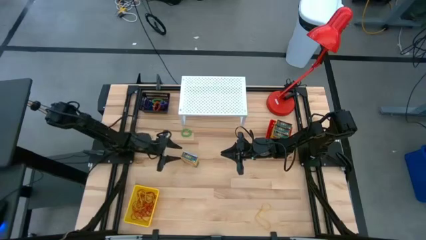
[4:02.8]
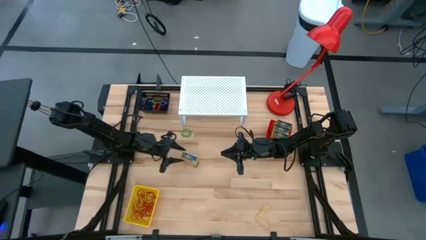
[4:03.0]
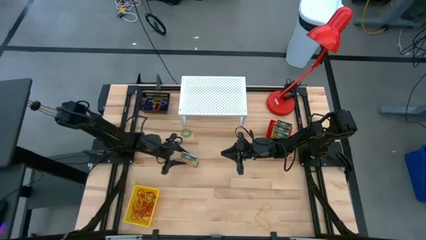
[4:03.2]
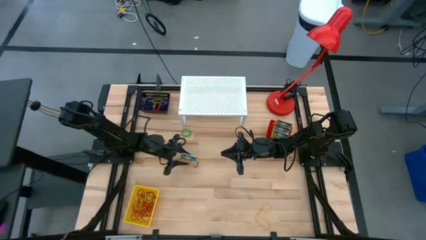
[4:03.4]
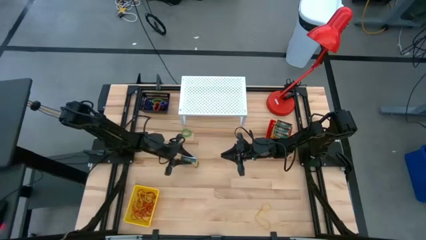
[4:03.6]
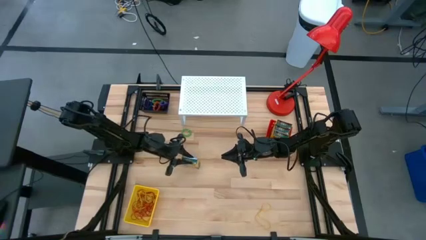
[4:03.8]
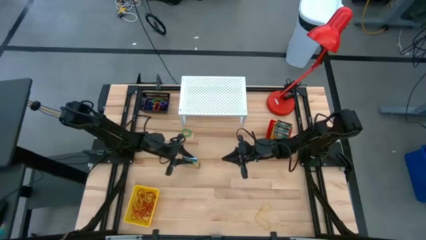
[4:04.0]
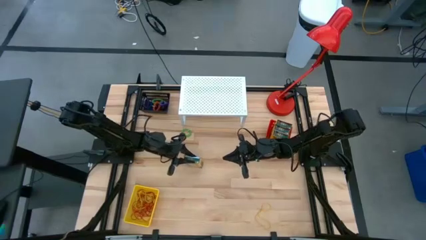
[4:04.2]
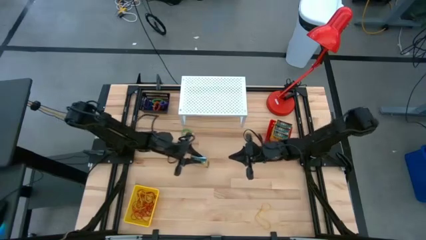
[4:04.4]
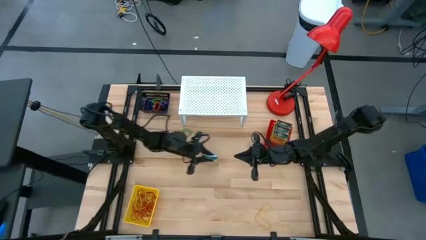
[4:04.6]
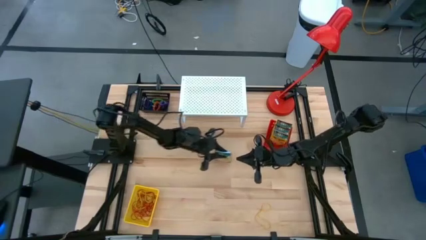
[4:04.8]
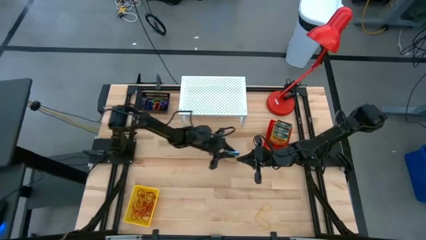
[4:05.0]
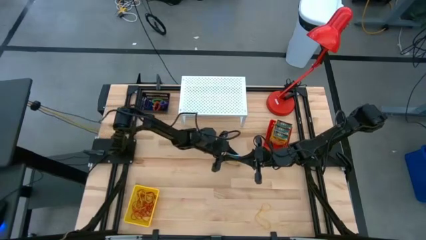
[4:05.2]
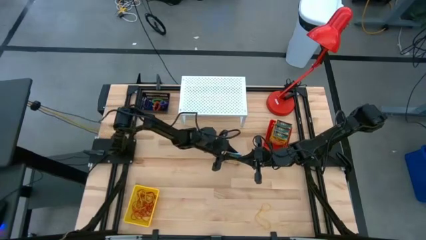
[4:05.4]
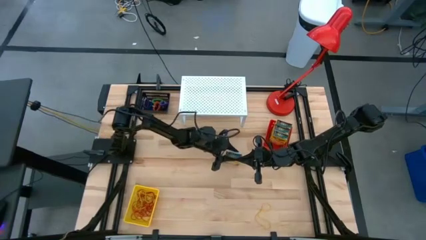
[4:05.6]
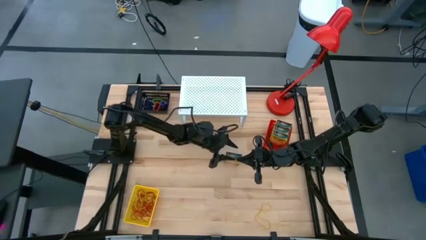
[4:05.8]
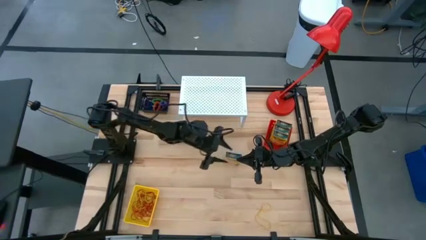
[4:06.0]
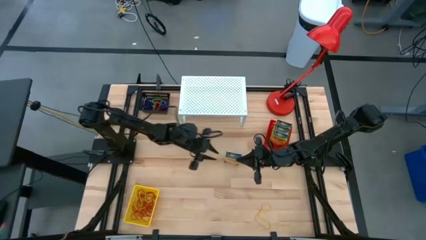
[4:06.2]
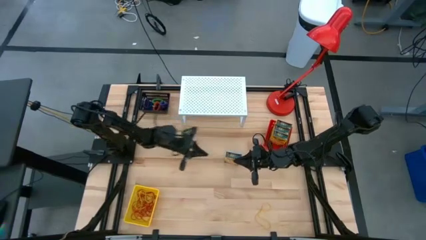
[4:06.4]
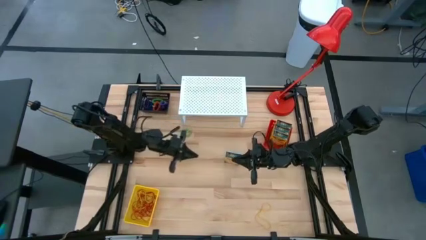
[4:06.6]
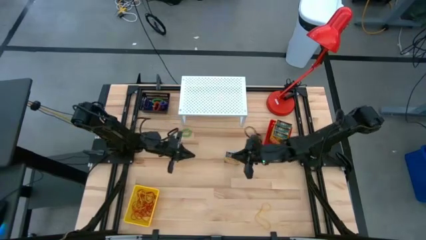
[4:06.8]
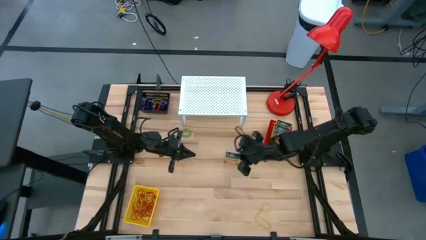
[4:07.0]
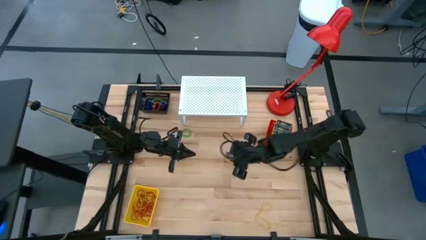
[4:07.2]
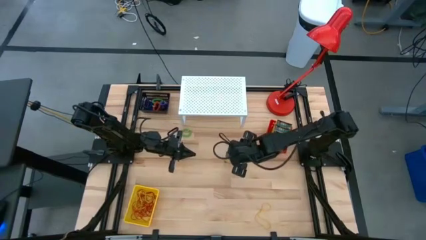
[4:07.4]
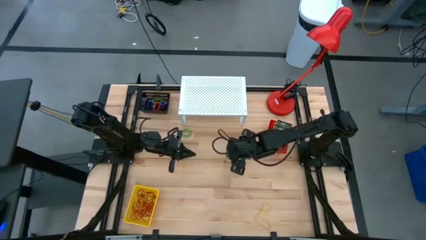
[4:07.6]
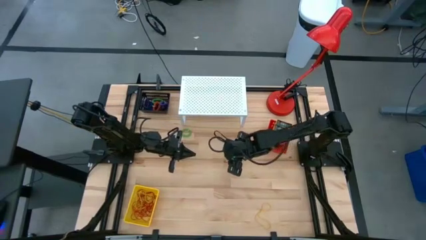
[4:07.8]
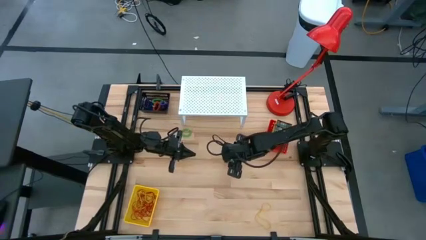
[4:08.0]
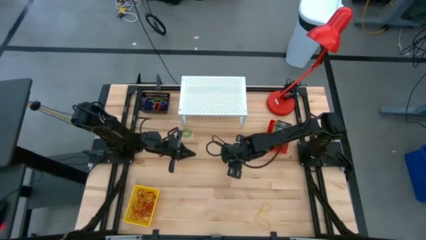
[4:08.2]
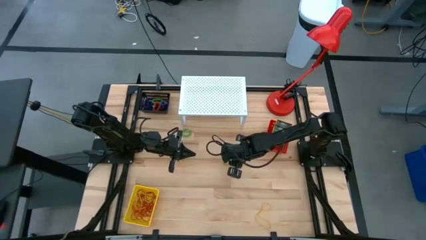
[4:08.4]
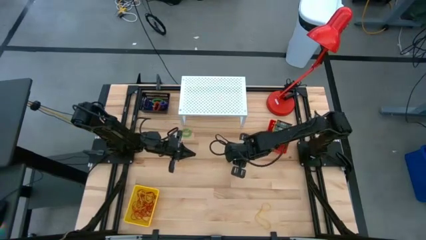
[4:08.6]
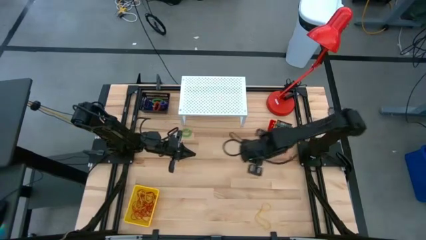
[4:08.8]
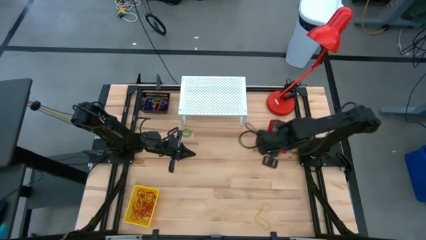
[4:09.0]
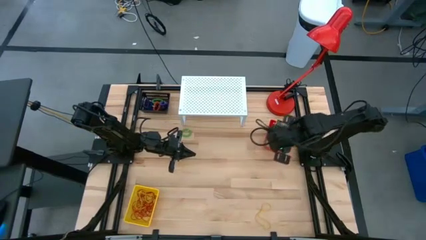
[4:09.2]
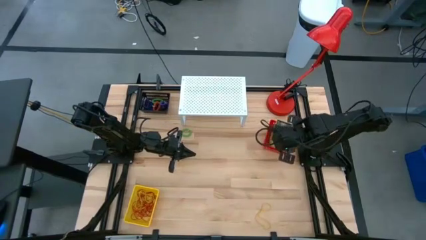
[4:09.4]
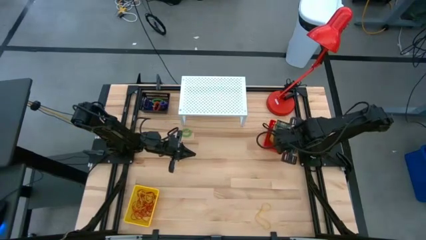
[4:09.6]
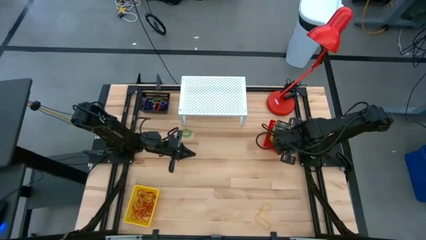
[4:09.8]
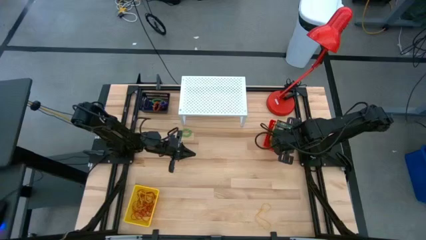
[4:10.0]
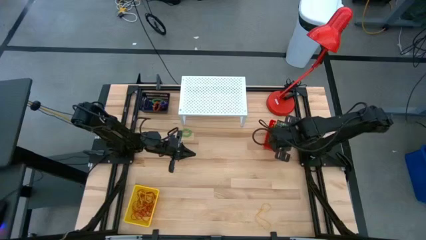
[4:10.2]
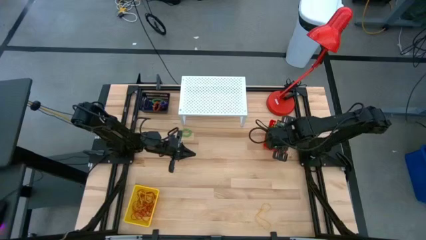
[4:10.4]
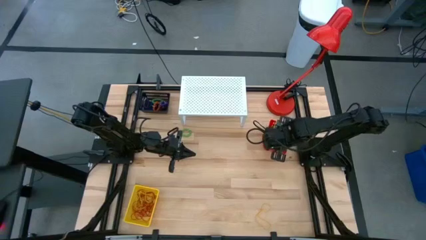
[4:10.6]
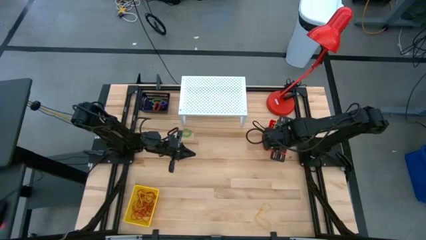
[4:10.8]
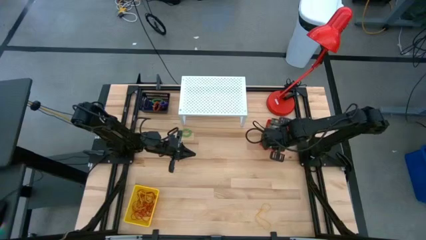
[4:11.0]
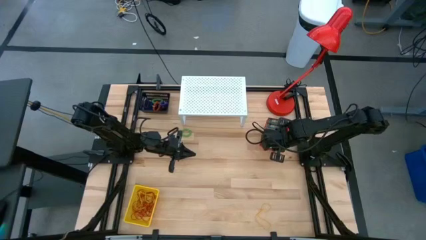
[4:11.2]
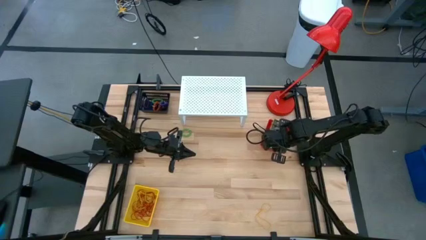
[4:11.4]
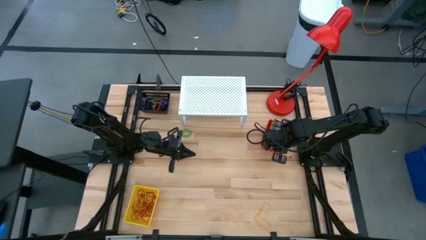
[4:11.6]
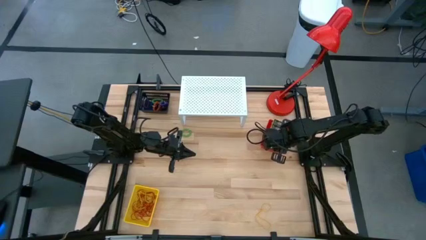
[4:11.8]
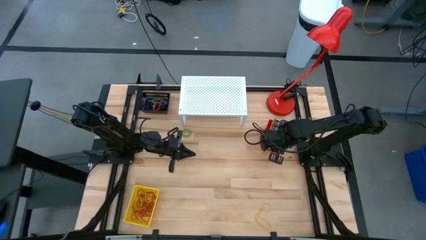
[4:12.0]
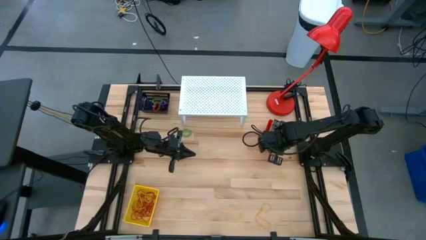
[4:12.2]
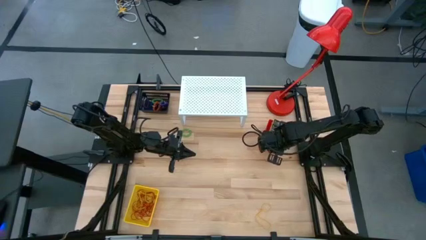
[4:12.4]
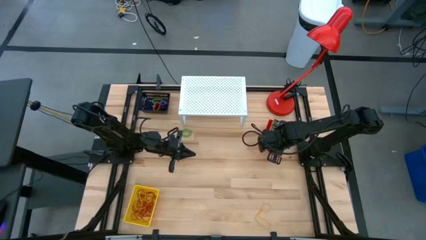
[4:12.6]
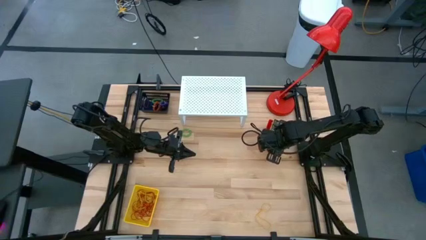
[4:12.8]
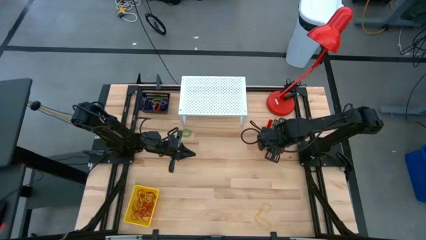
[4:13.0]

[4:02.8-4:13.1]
Task: Pick & Place Office Desk Supplies
Put the box yellow crayon into the red bin

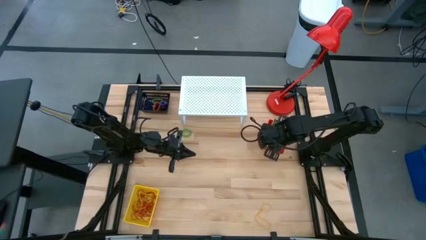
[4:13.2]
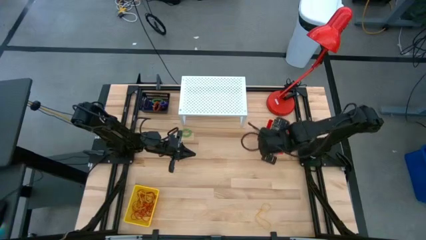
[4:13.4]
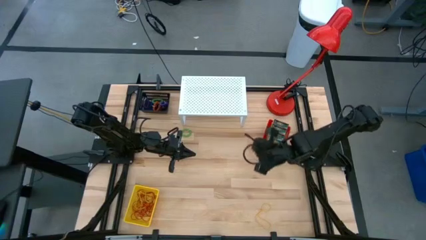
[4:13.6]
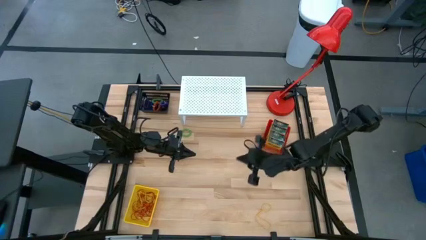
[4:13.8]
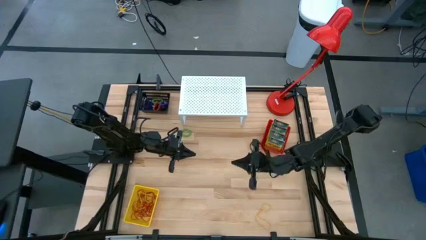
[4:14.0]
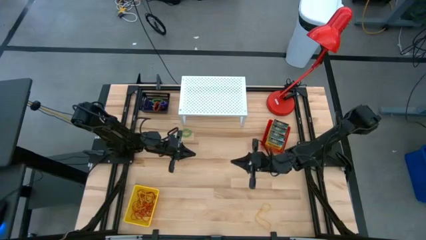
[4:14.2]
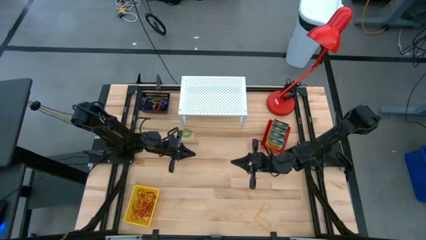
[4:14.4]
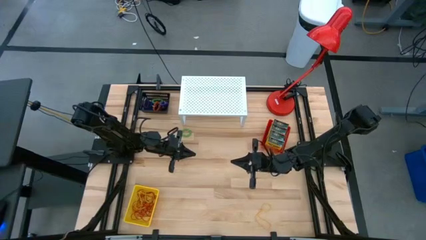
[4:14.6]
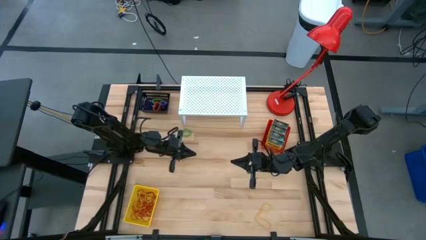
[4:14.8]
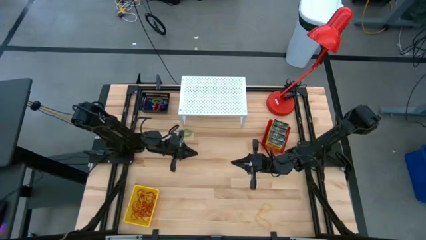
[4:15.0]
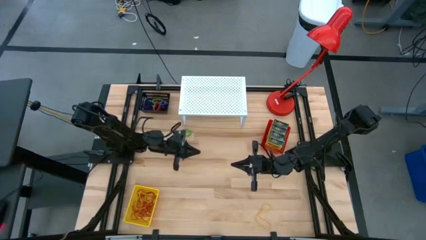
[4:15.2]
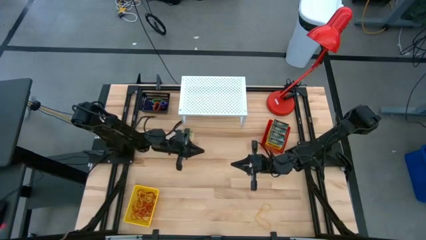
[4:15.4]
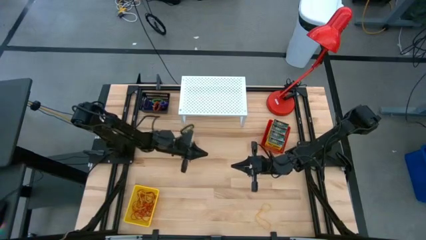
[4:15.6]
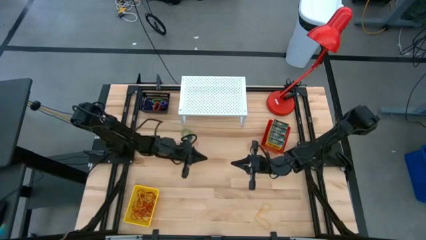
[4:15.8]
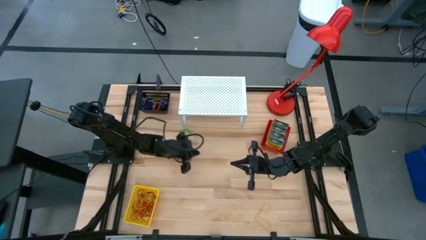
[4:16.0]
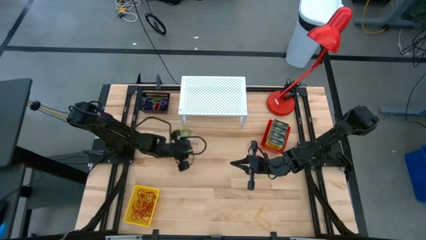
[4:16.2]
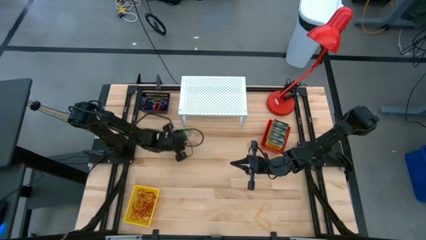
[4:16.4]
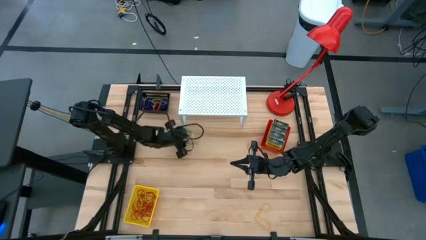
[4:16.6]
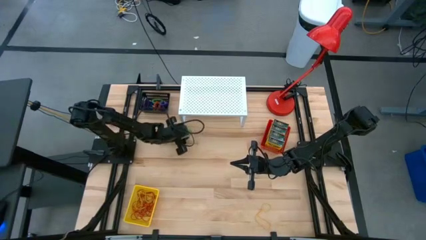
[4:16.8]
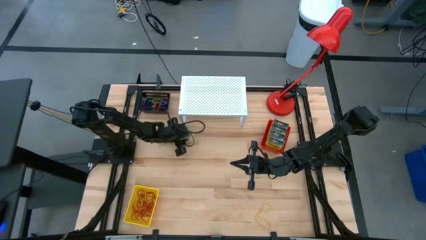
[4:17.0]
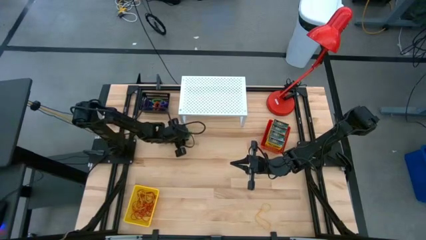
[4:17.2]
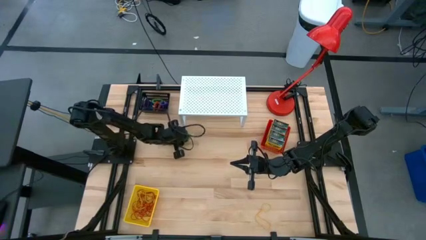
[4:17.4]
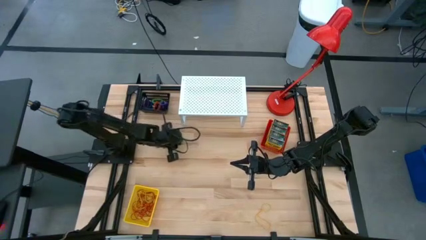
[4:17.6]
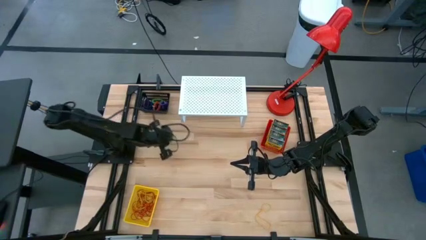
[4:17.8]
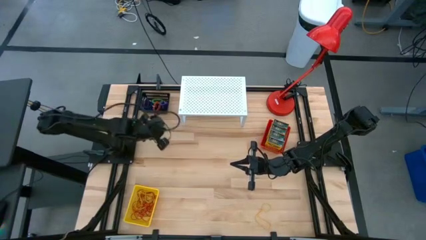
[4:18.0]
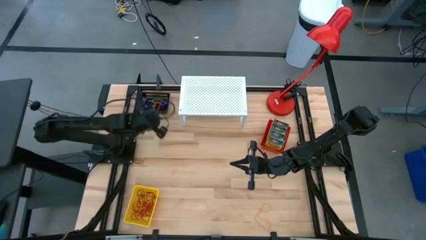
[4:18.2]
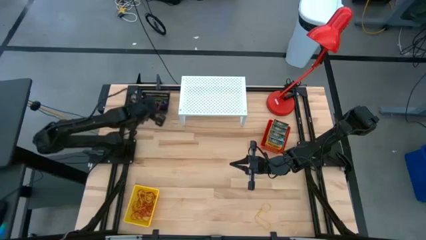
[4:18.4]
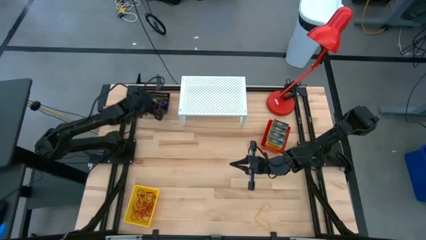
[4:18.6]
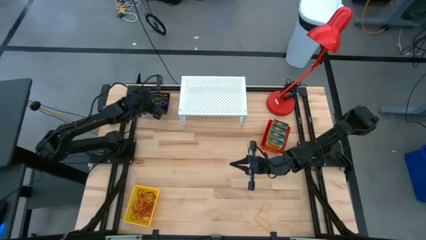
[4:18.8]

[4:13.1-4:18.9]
Put the green spring rubber band into the black bin
